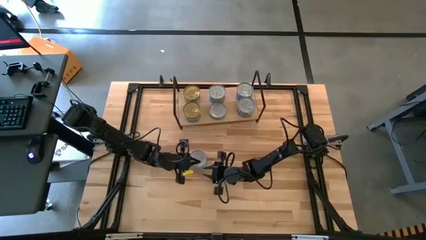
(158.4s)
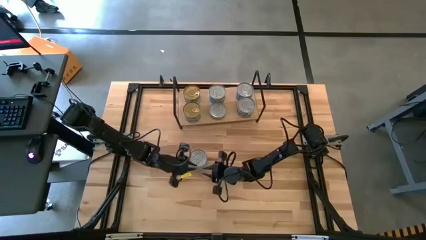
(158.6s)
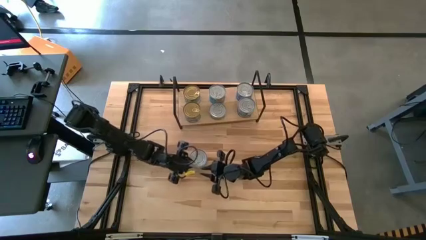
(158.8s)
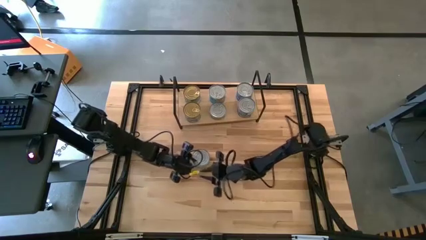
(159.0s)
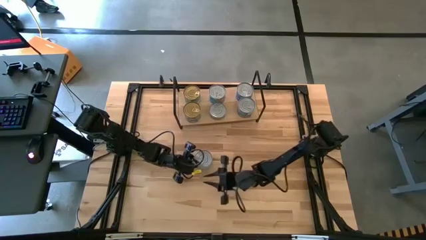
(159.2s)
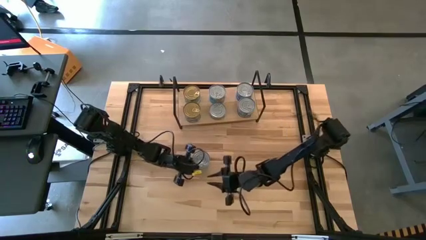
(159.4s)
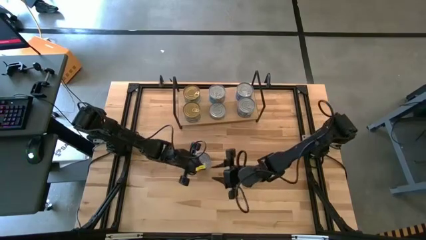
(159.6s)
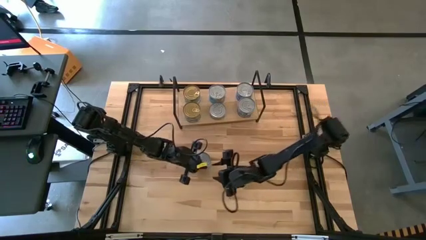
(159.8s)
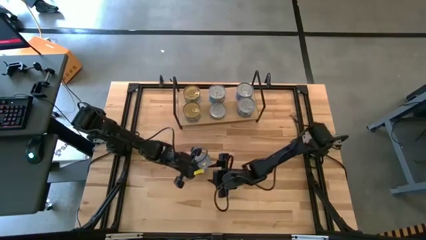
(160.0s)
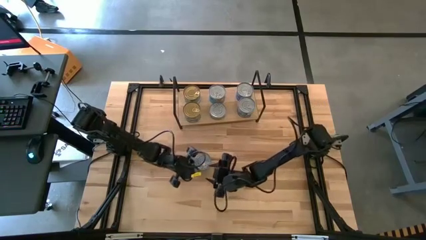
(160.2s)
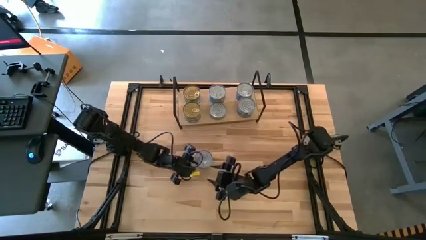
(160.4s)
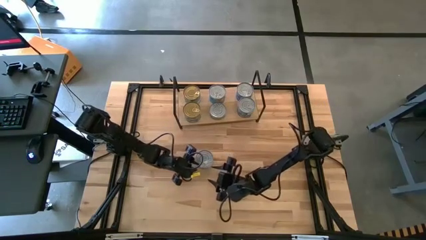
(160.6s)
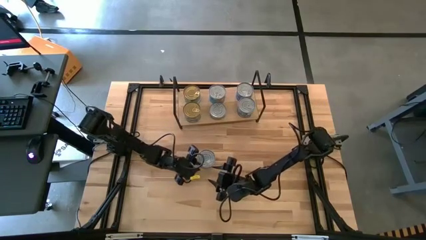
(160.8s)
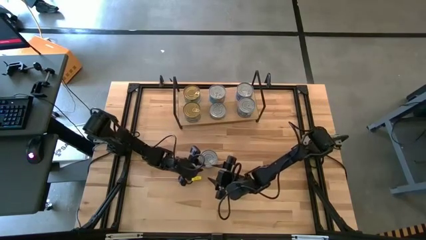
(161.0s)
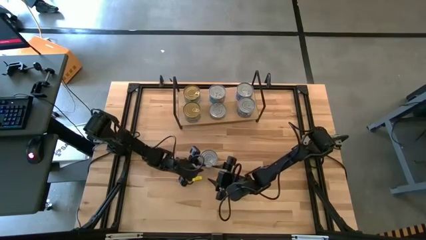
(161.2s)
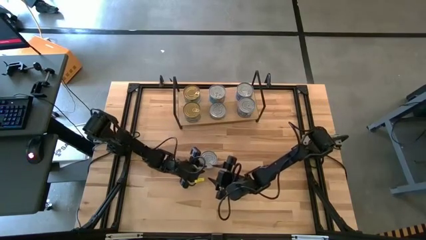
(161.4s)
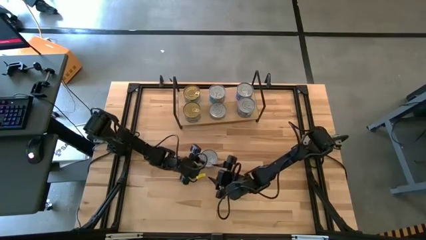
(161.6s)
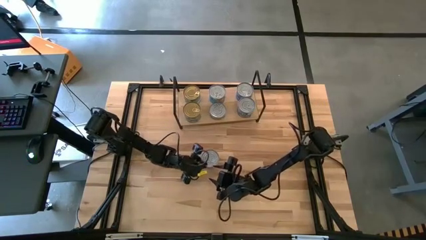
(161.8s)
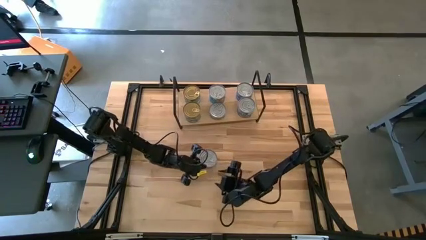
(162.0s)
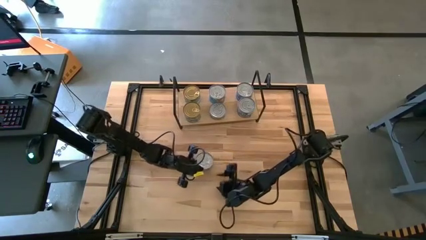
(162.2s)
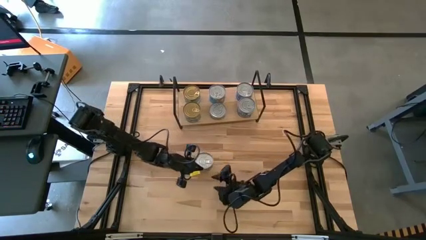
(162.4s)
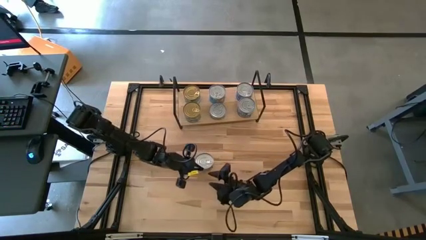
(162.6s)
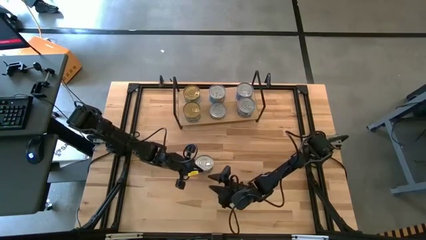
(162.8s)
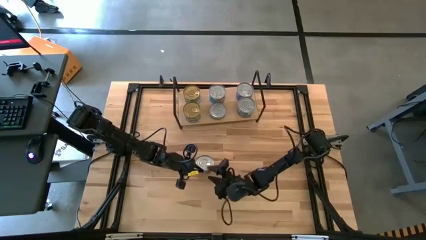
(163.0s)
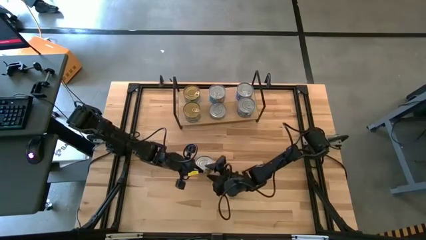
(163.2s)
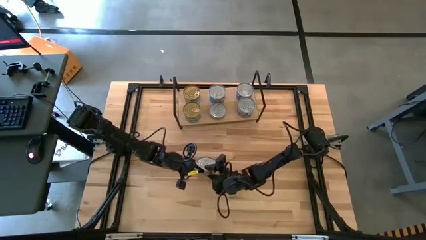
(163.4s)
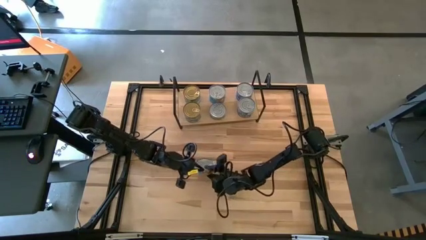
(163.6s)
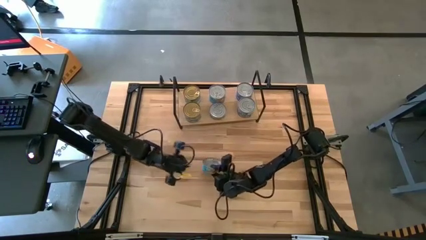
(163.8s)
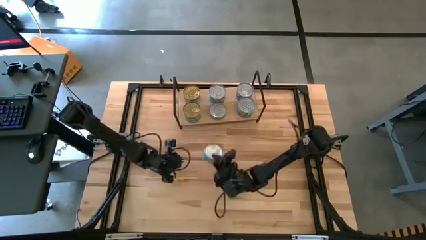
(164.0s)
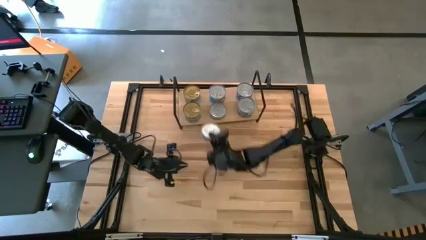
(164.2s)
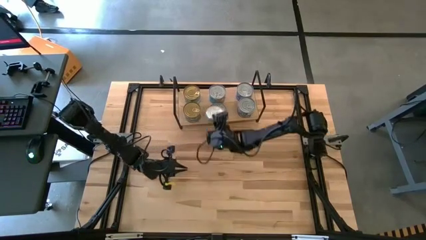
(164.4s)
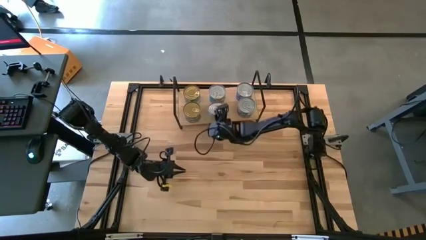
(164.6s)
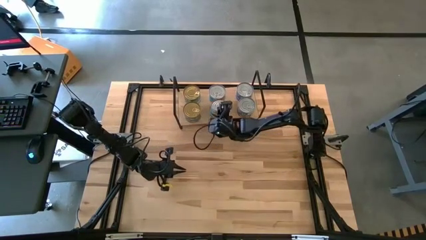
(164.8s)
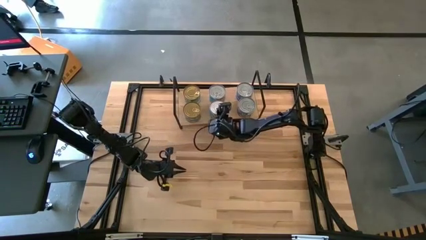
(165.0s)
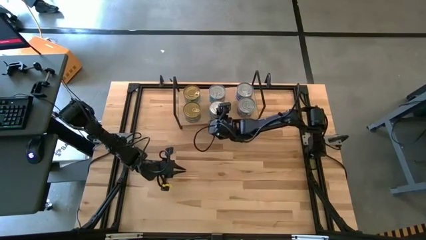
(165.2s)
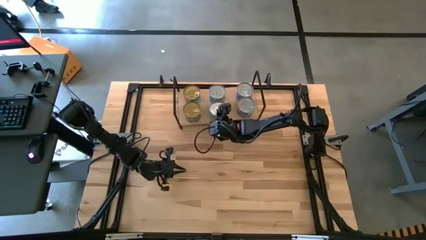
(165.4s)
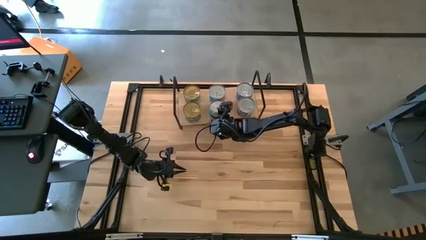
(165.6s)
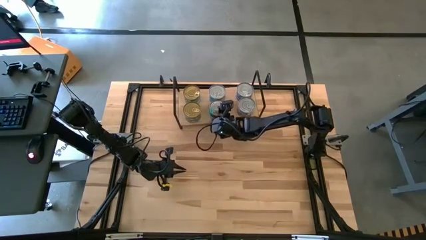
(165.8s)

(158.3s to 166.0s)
Task: Stack canned seafood by type on shelf
Stack the yellow blue tuna can on top of the yellow blue tuna can on the shelf

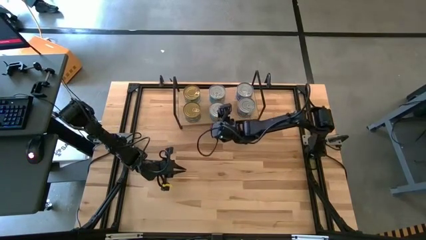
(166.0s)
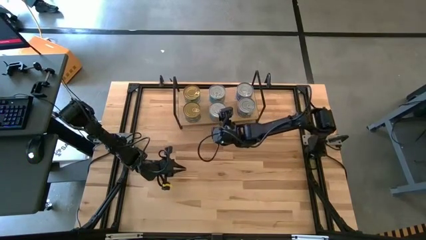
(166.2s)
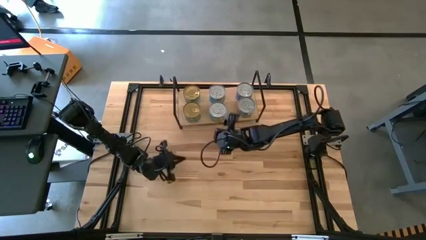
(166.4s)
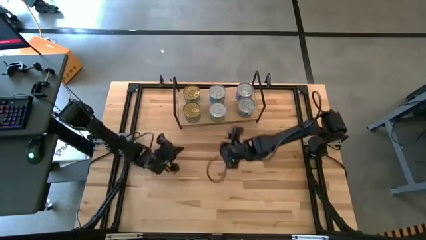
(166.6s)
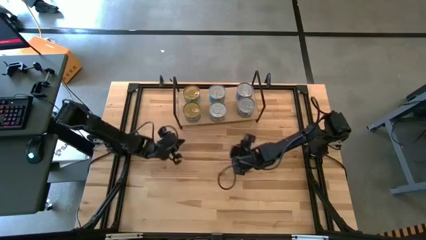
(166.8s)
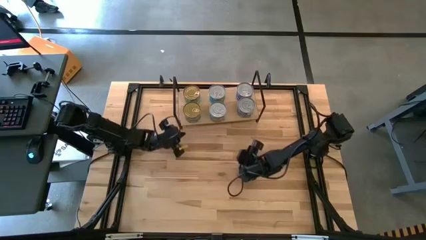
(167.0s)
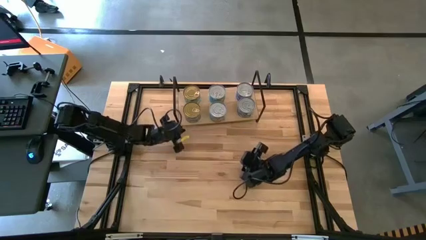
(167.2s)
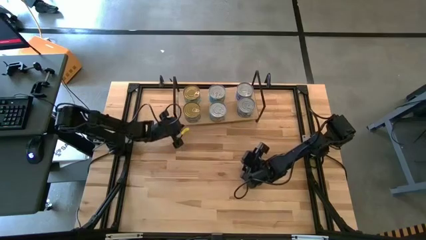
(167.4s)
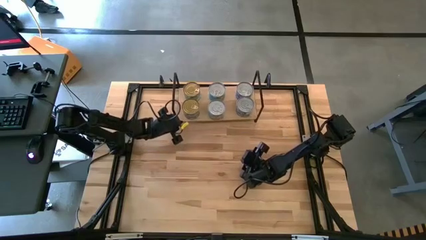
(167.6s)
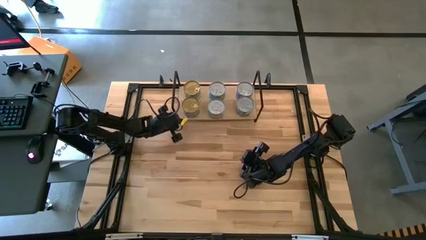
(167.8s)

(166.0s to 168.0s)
Adjust the shelf

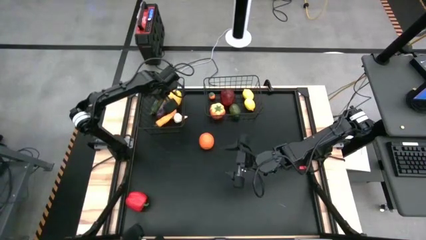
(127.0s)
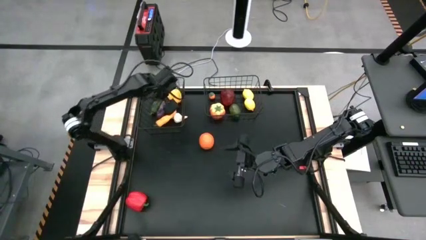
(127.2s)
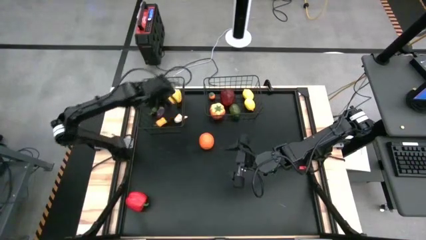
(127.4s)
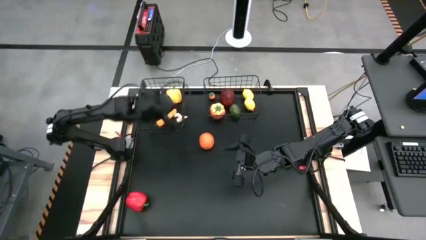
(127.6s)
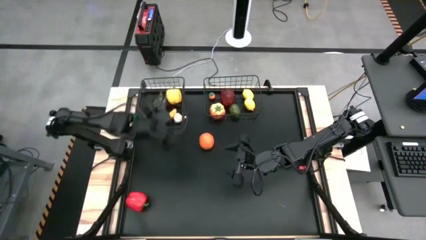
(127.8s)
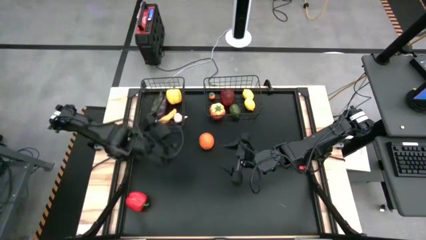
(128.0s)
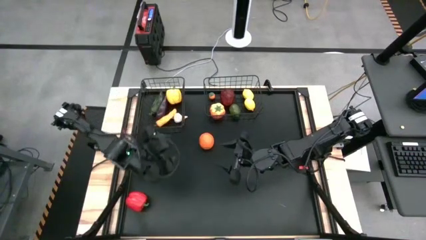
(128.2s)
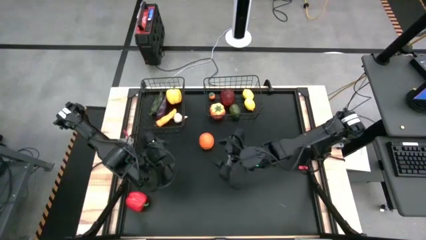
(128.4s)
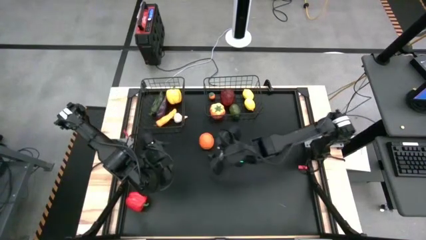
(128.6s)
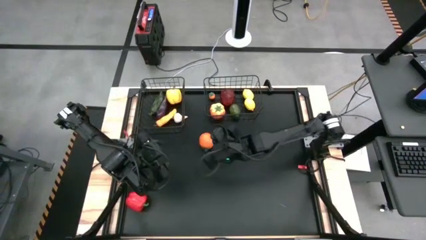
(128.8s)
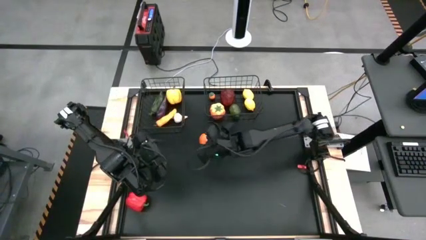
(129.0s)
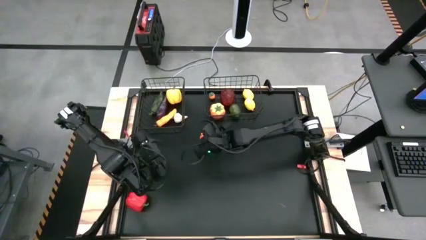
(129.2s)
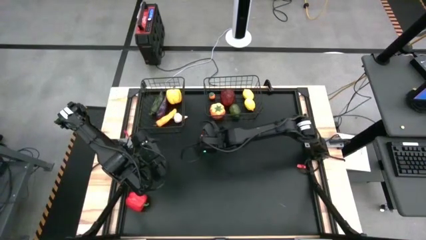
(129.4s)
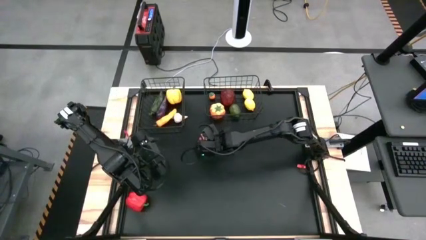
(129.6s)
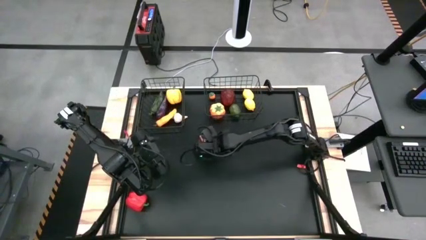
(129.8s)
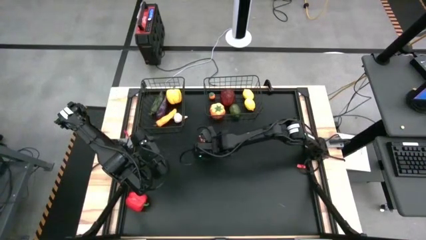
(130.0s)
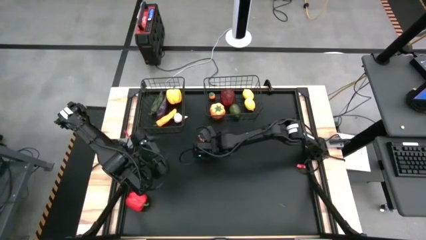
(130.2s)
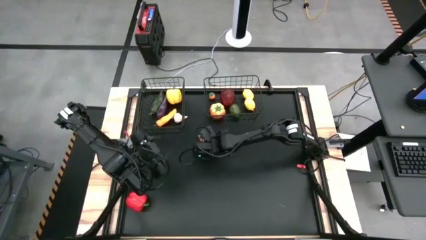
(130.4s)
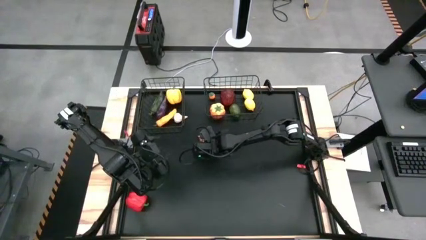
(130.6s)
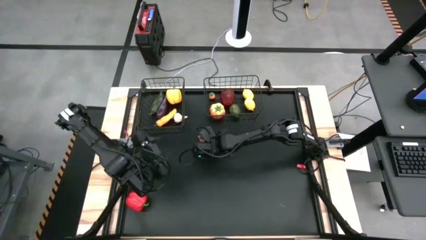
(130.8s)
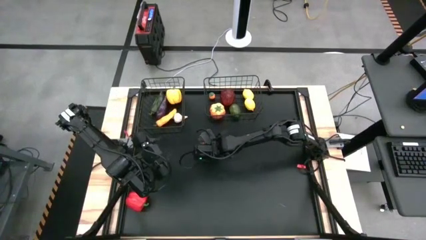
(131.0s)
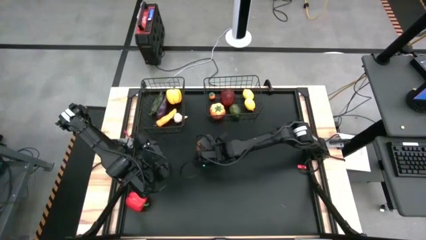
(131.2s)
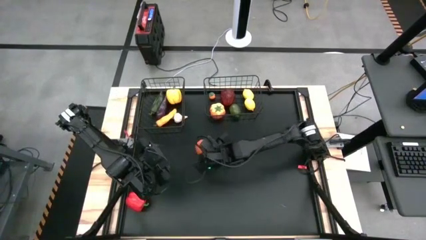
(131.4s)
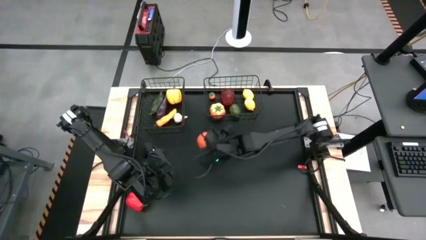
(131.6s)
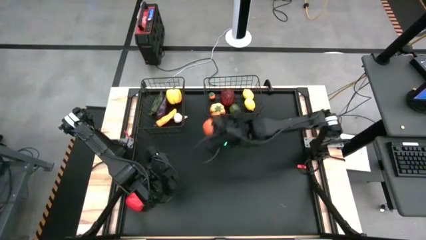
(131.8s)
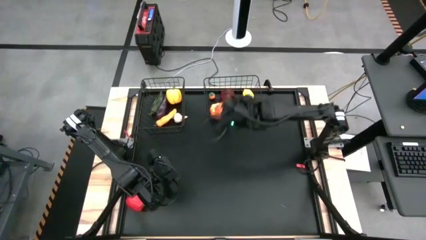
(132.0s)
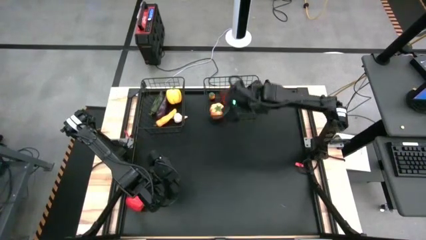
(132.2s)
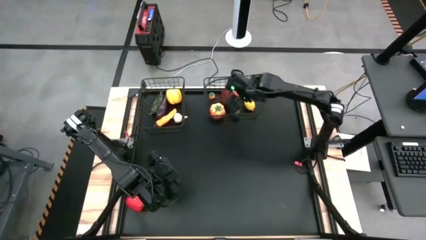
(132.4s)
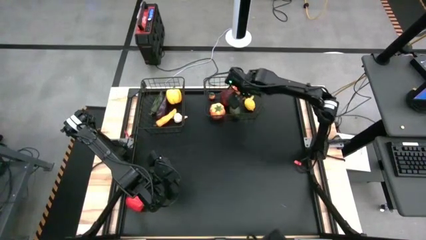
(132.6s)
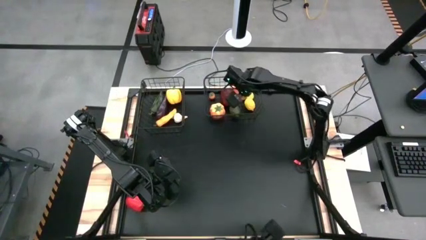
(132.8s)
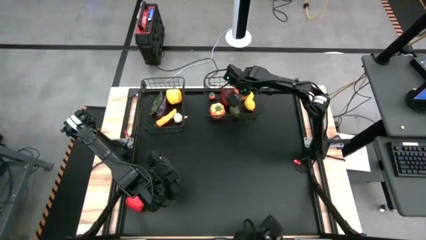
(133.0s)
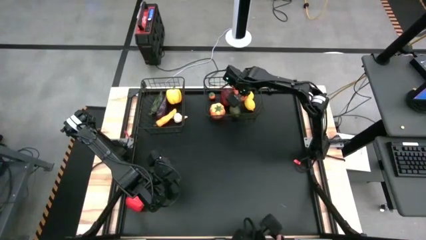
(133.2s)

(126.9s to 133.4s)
Task: Sort produce into baskets
Put the orange into the right black wire basket
